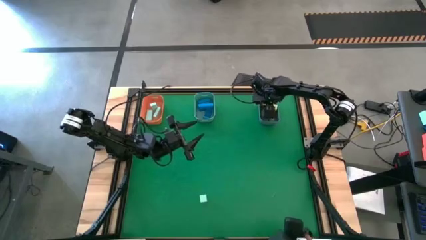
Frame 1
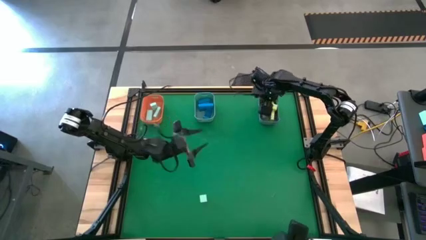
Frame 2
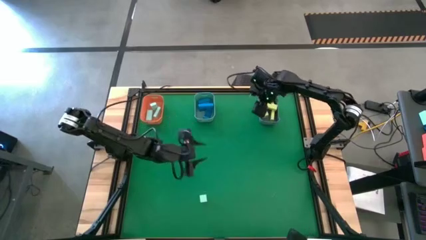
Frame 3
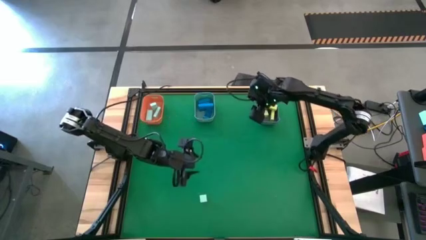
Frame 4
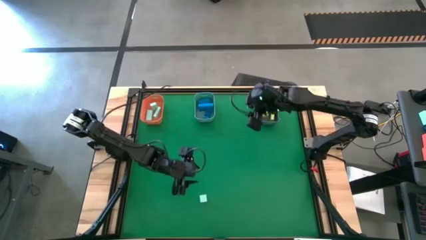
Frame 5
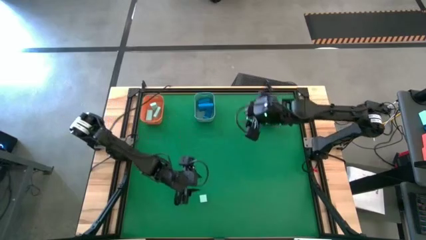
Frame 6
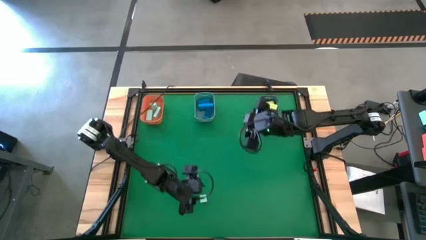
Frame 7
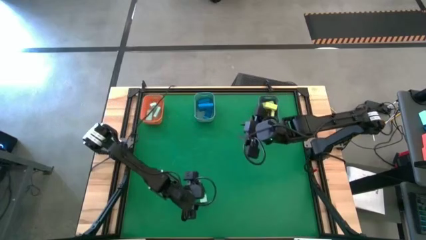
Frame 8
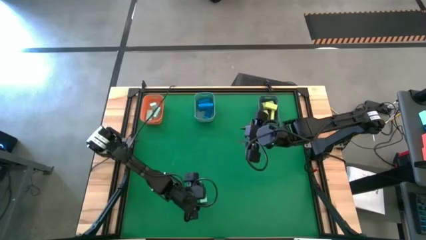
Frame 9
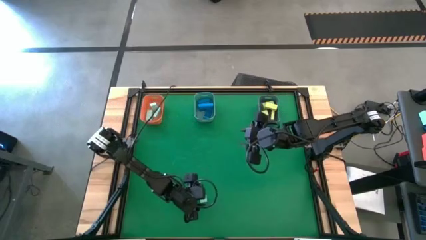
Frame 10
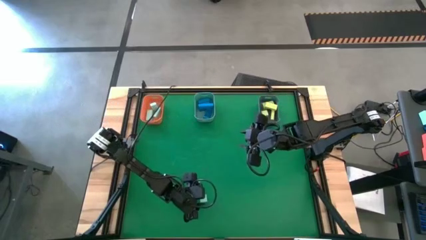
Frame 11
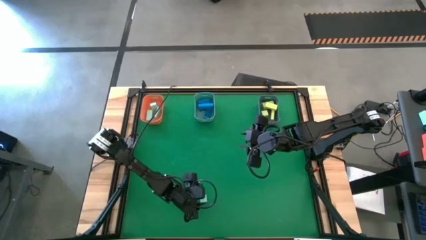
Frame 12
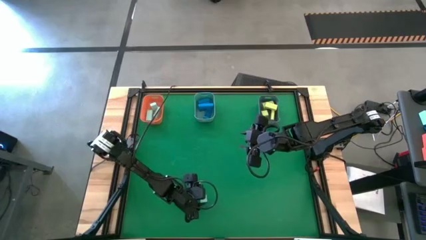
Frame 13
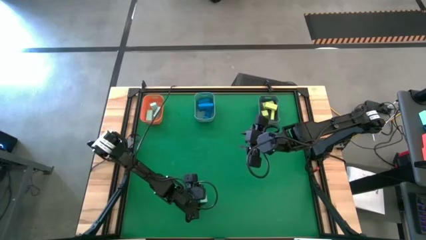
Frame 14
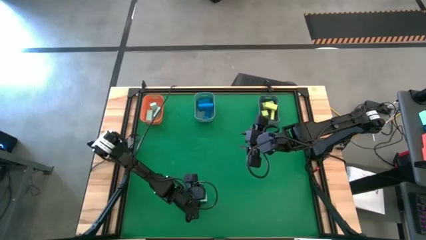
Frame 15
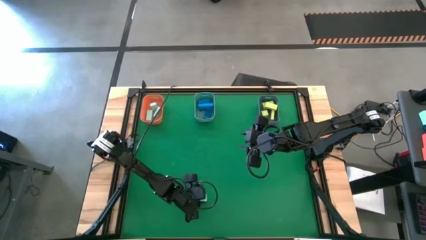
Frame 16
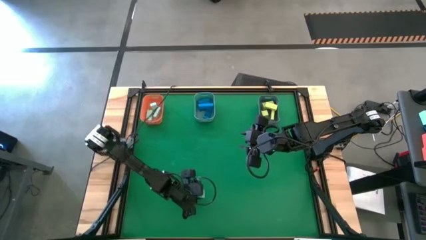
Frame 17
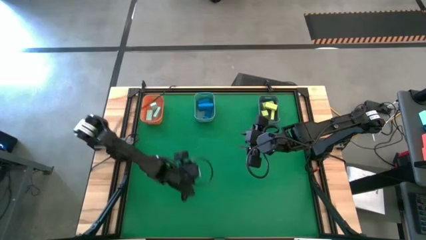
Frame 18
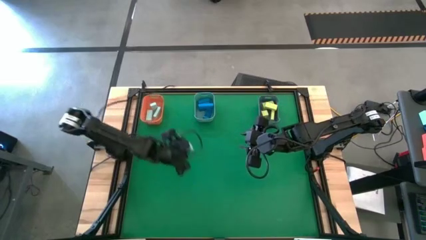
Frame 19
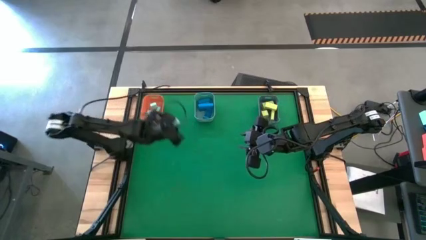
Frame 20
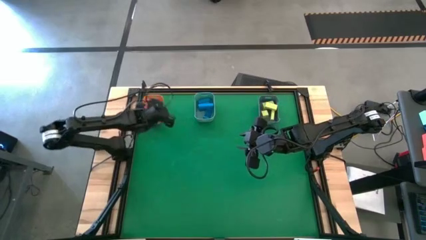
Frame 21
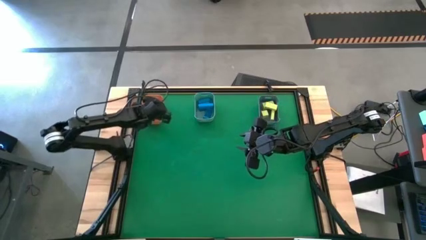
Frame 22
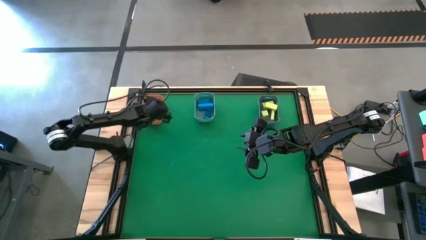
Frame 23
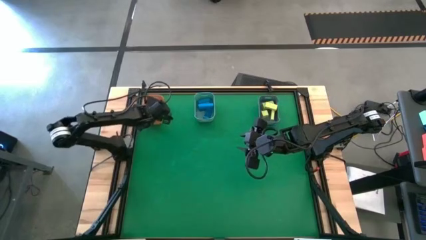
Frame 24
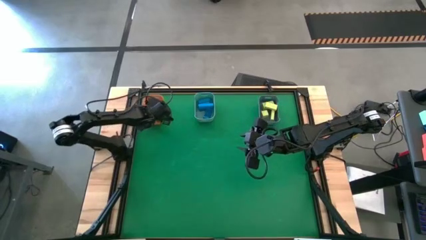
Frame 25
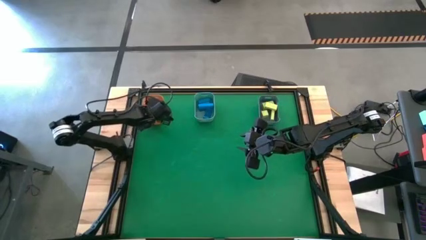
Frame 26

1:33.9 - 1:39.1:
Task: Sort & place blocks by color
Put the light blue block piece into the orange bin

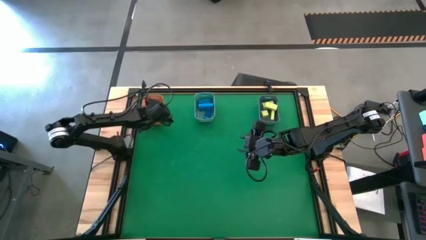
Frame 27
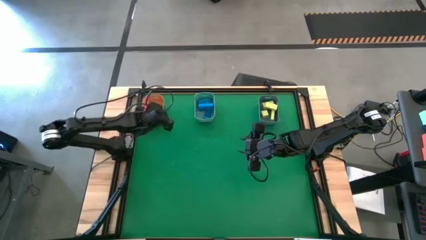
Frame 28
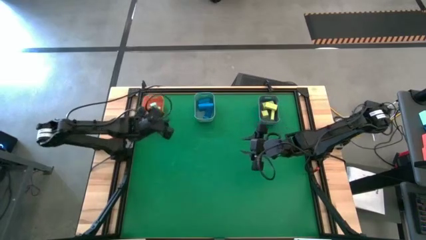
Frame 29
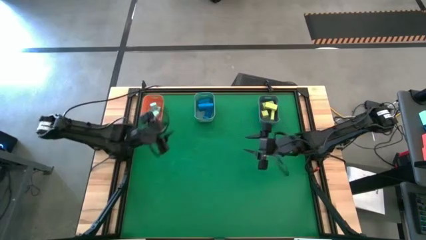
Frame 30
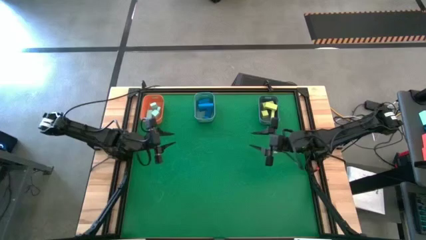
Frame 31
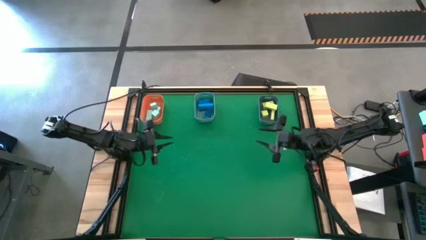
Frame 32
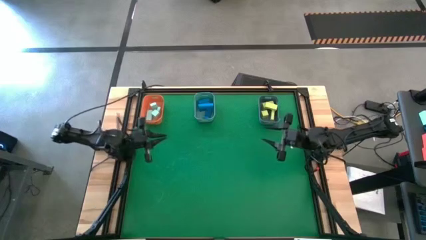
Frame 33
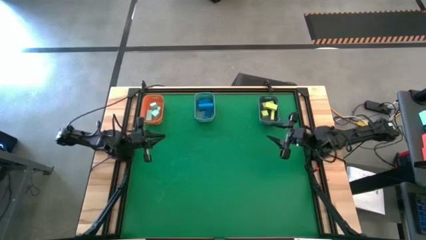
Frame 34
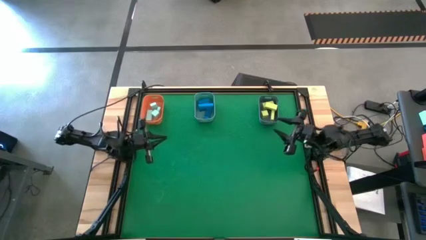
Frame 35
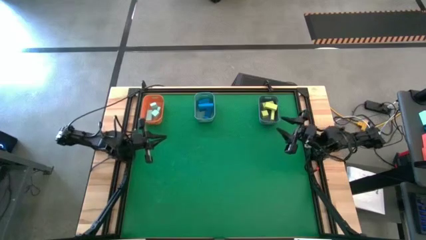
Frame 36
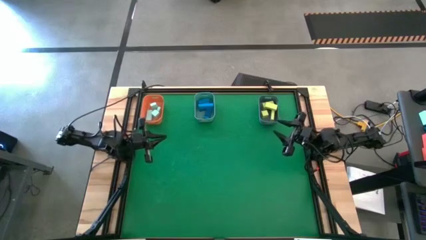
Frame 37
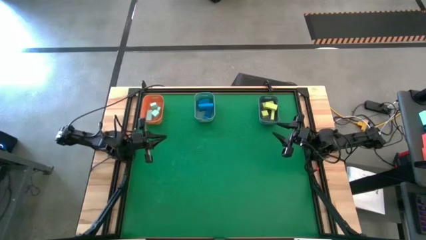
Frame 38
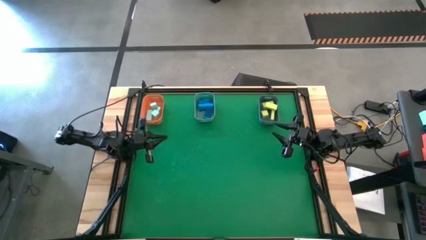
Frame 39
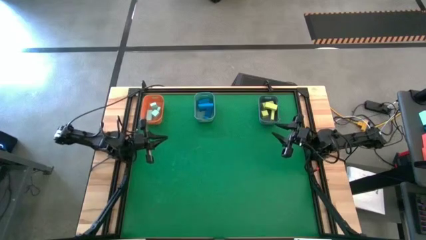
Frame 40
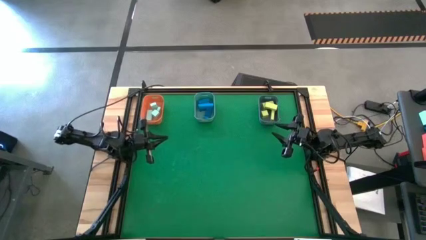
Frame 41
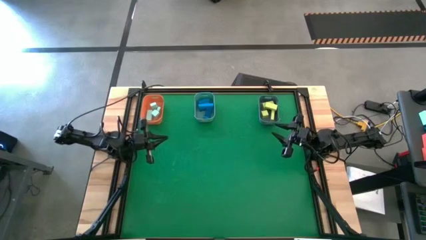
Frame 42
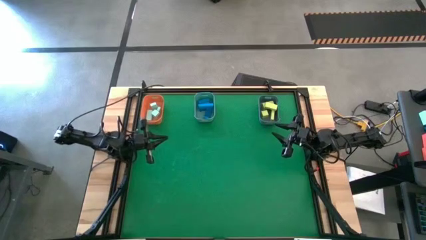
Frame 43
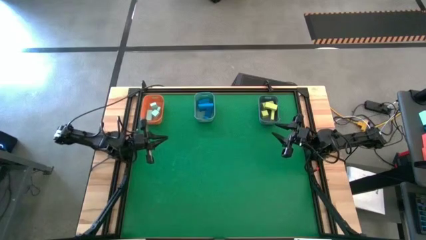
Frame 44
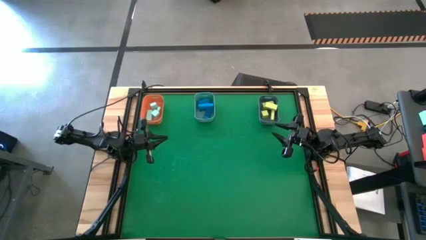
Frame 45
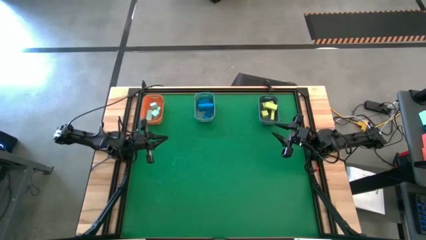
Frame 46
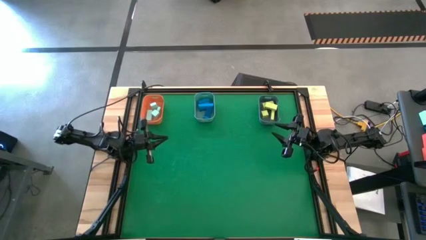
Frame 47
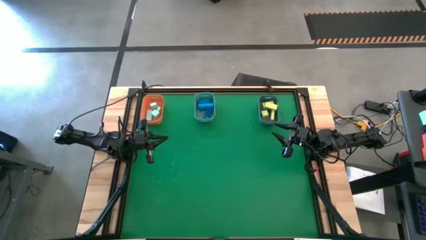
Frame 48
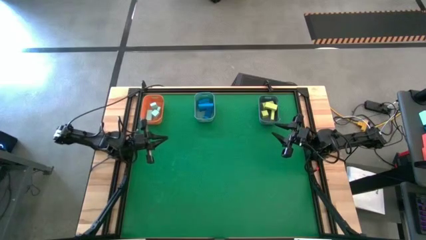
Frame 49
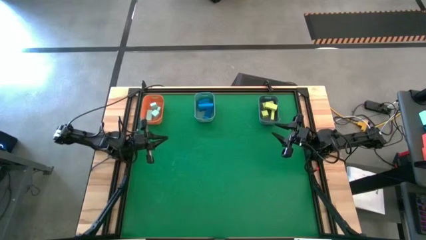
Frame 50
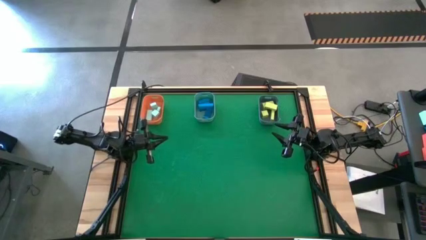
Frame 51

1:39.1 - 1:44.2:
Return to Home Position

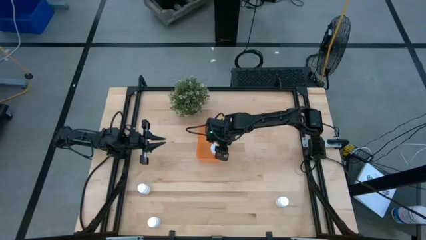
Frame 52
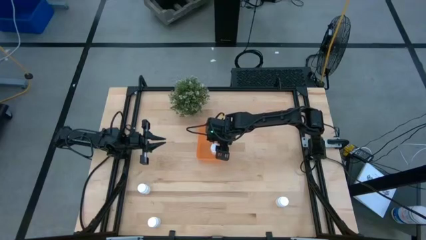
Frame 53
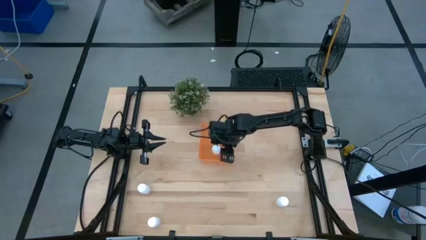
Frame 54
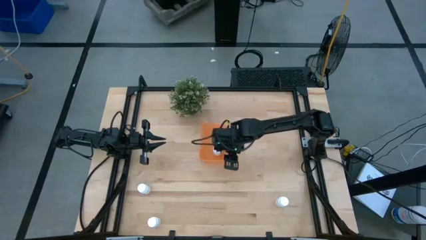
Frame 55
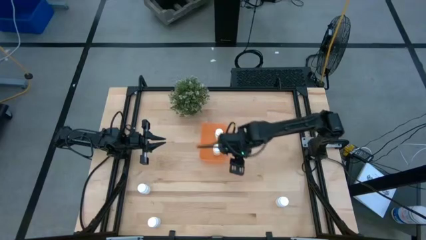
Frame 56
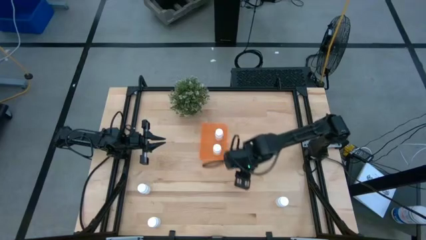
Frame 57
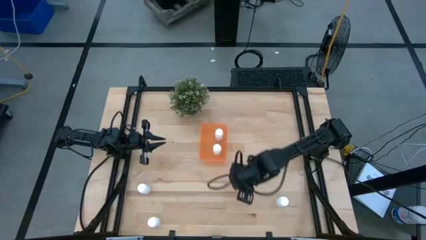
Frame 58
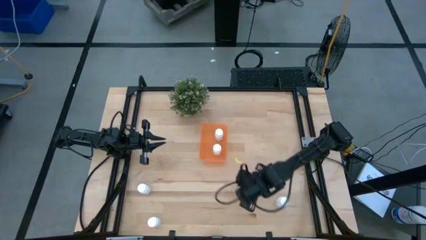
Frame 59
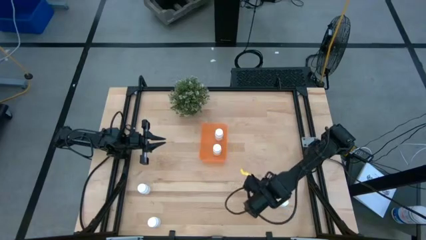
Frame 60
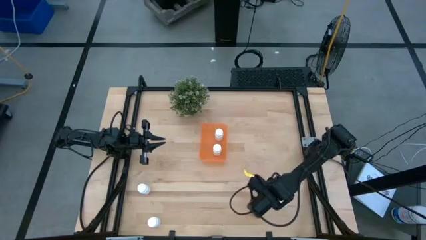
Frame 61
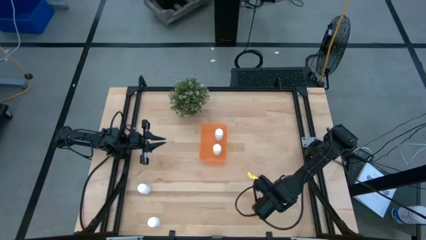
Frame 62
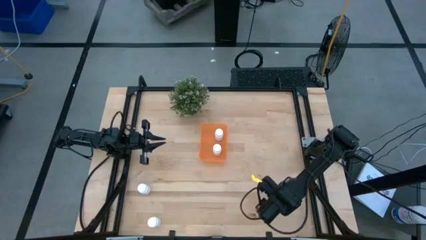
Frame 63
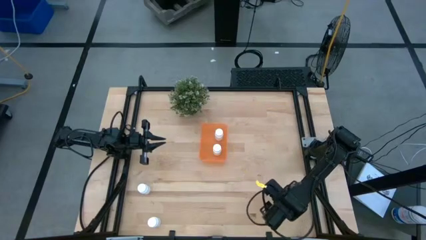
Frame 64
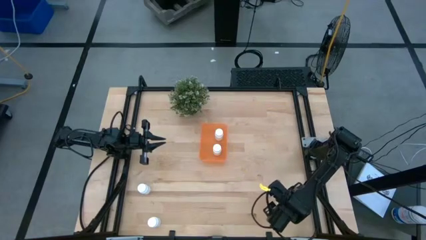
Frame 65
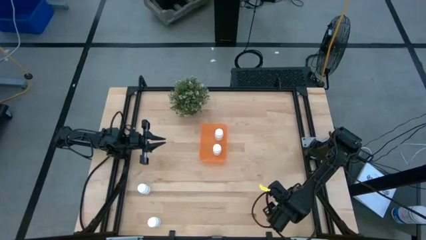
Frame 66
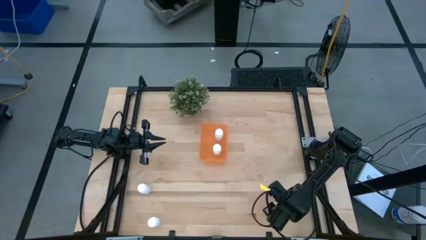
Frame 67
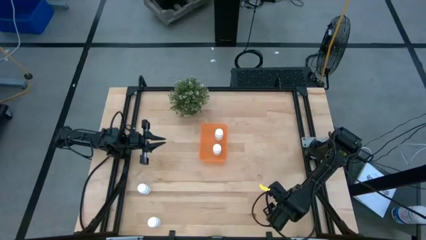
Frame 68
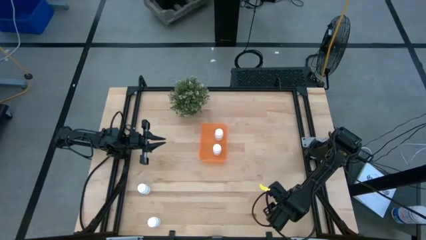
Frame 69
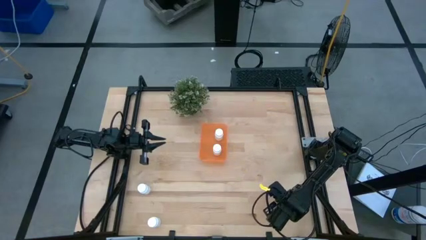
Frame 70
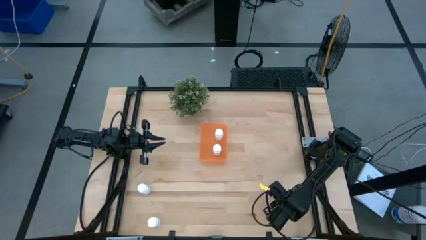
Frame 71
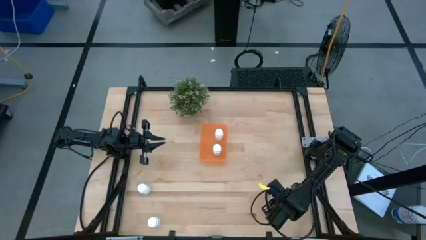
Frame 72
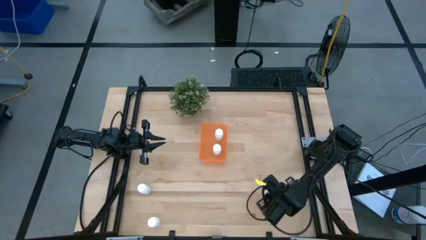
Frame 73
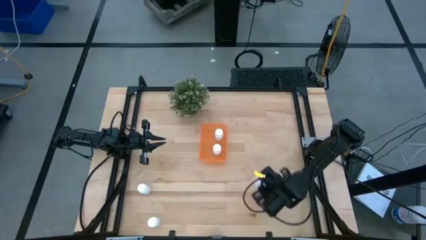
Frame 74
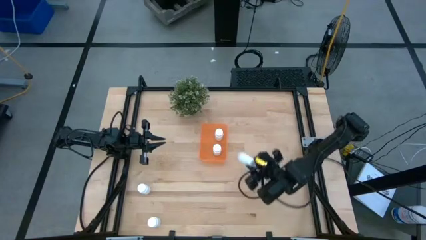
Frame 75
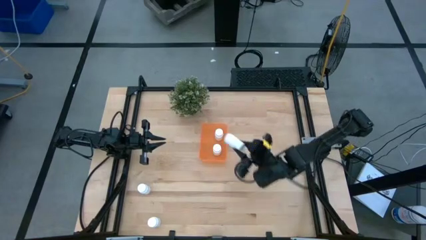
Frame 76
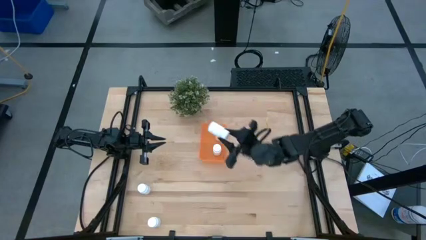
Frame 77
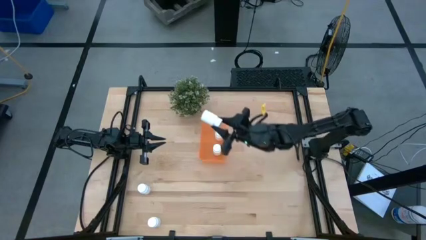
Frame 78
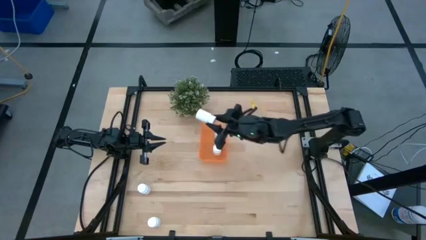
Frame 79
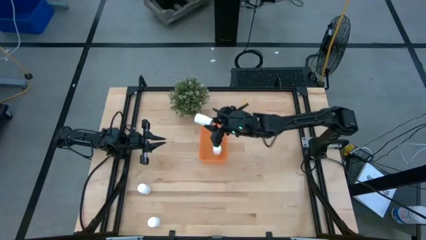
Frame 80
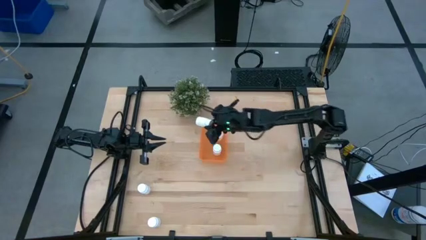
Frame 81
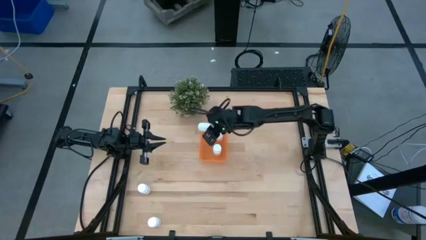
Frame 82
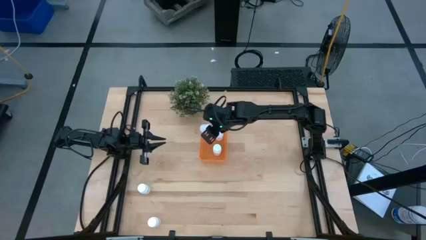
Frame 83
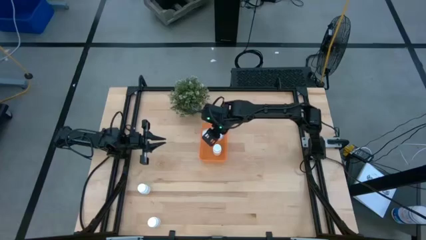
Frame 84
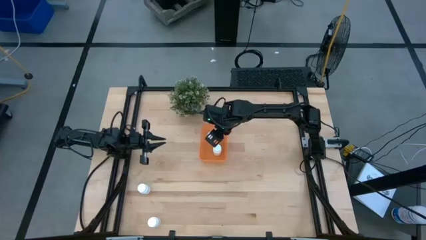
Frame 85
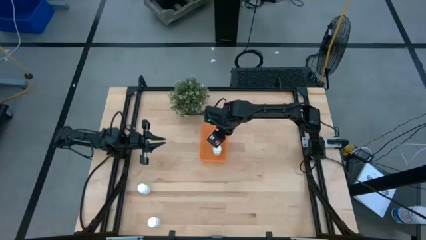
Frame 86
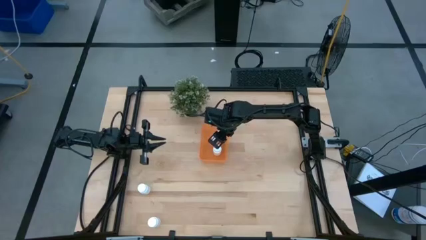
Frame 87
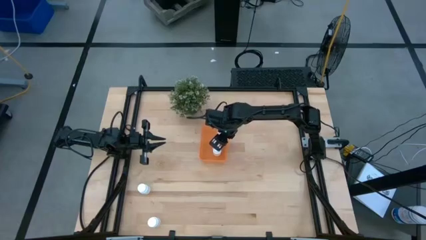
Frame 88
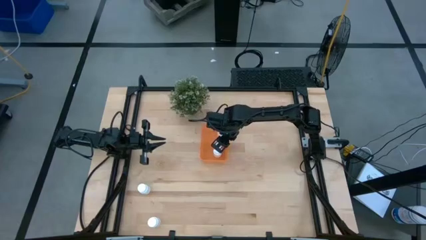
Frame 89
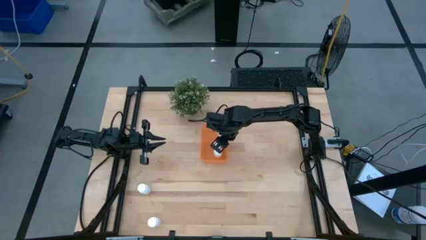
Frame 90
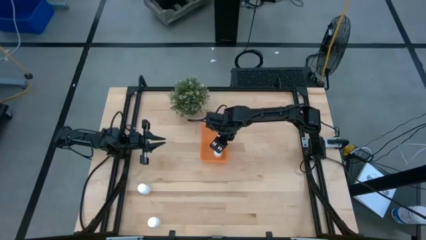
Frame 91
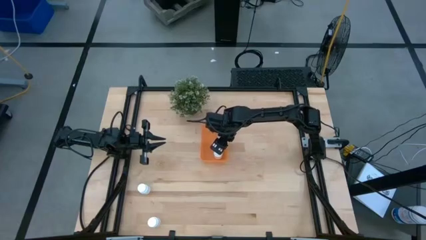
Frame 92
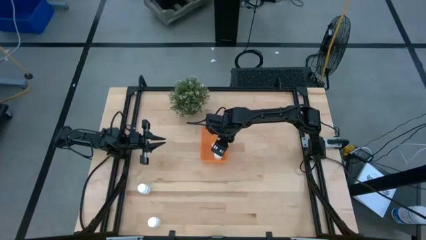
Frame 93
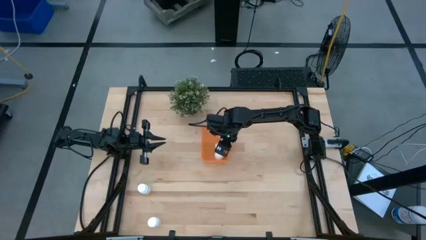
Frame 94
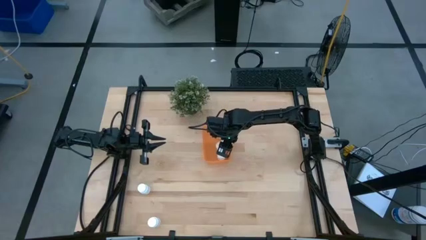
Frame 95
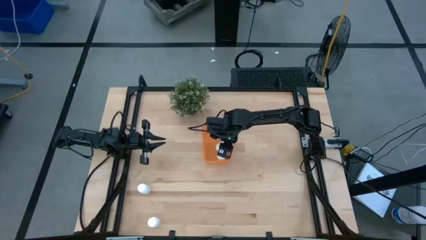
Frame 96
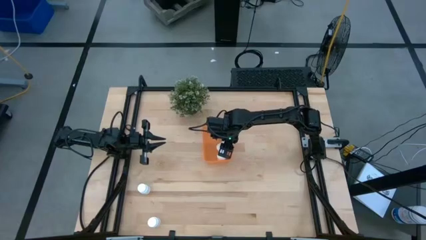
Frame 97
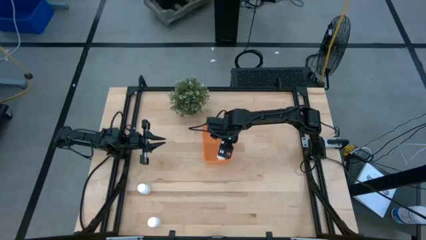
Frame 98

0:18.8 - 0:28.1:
Task: Pick and place pill bottles into a basket
Put the white medicine bottle into the orange bin
